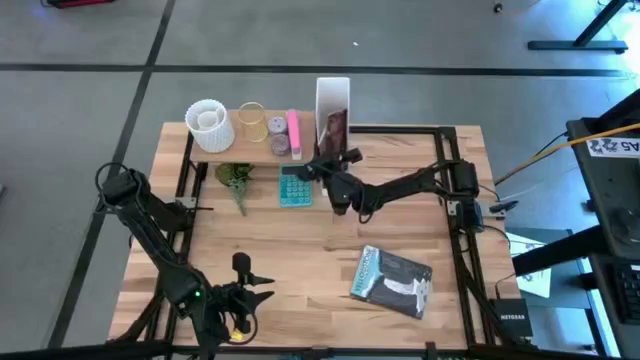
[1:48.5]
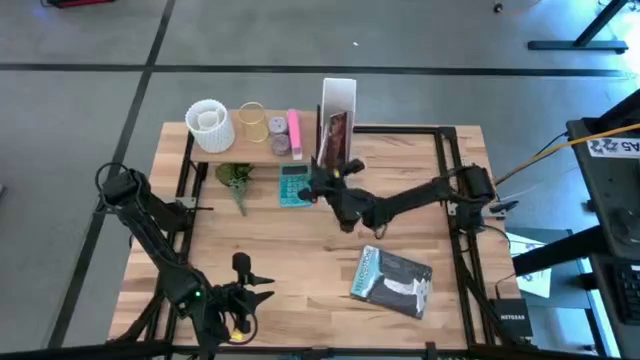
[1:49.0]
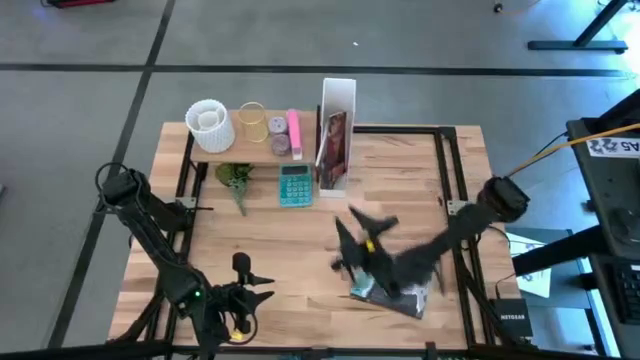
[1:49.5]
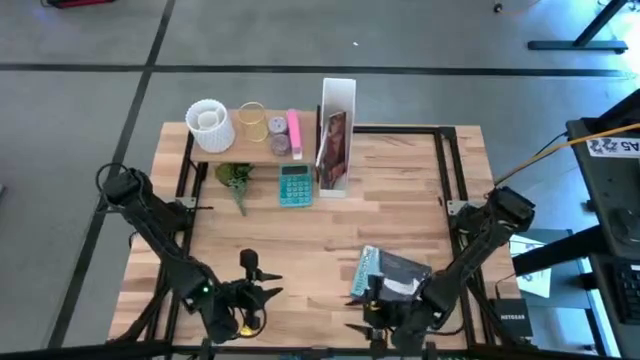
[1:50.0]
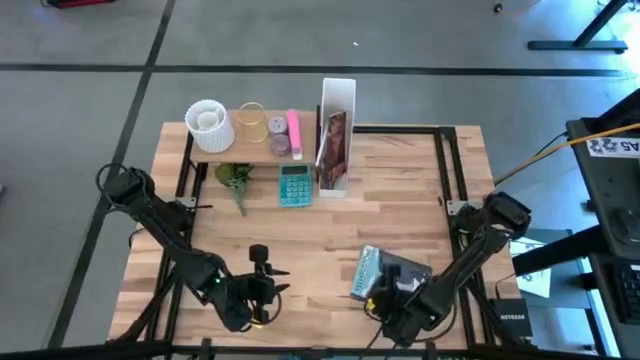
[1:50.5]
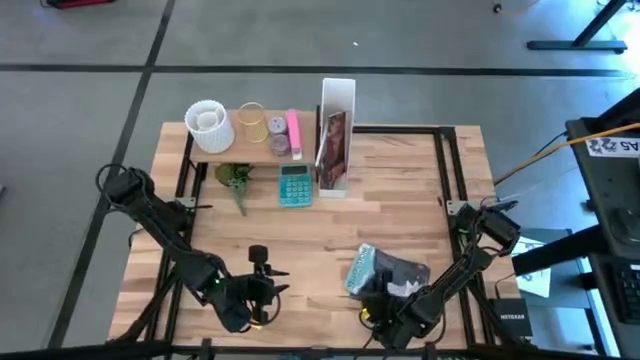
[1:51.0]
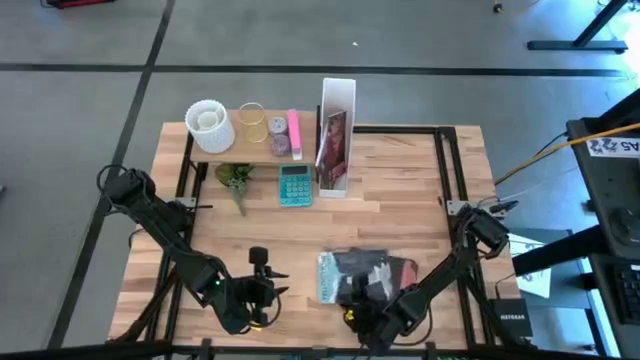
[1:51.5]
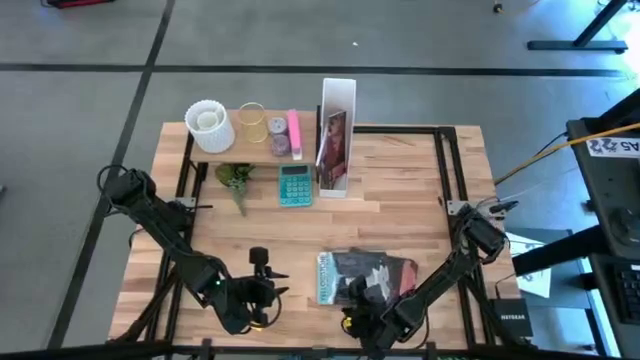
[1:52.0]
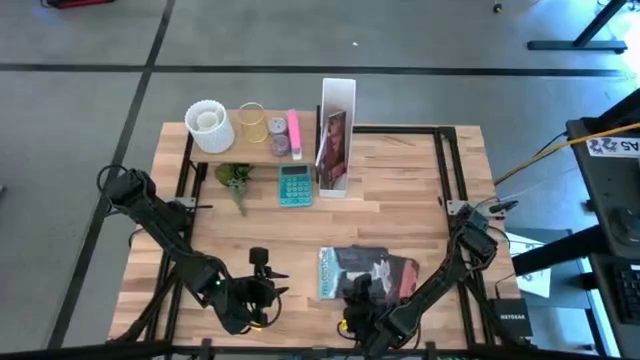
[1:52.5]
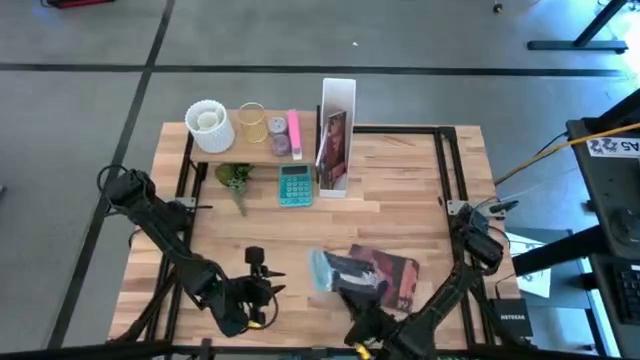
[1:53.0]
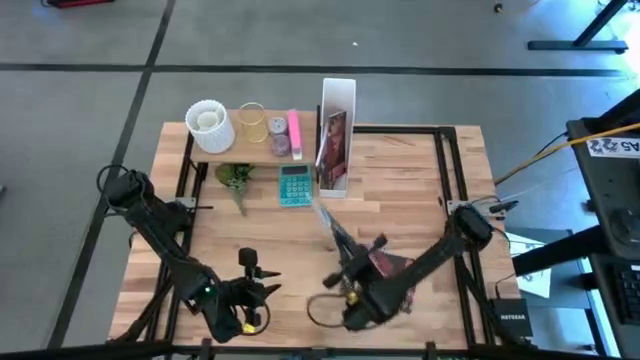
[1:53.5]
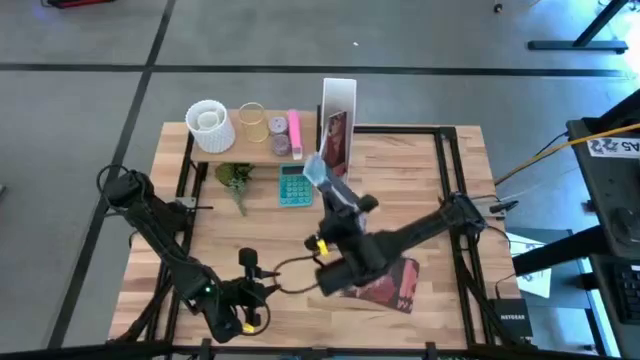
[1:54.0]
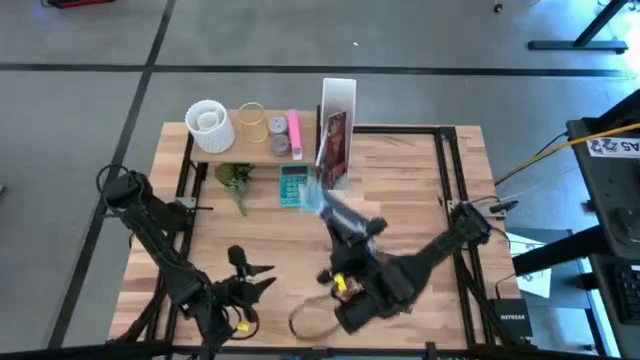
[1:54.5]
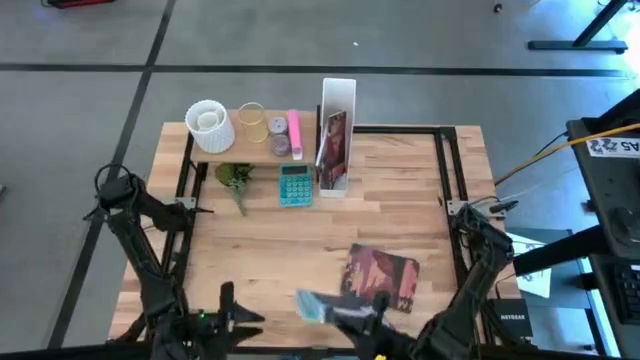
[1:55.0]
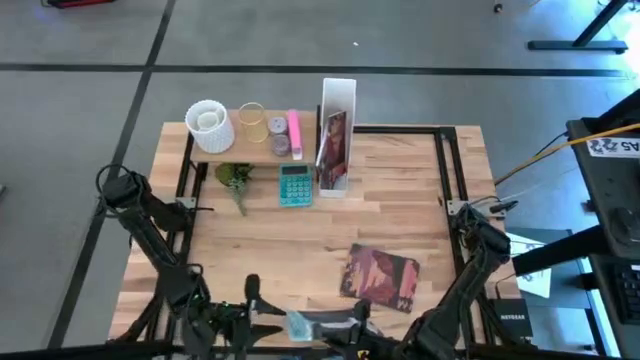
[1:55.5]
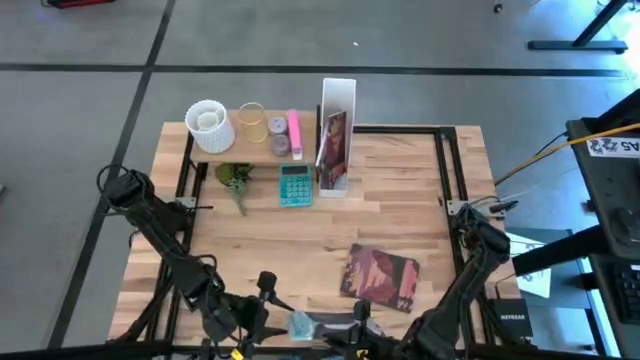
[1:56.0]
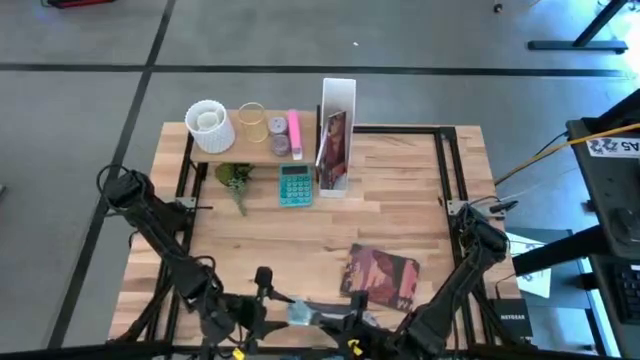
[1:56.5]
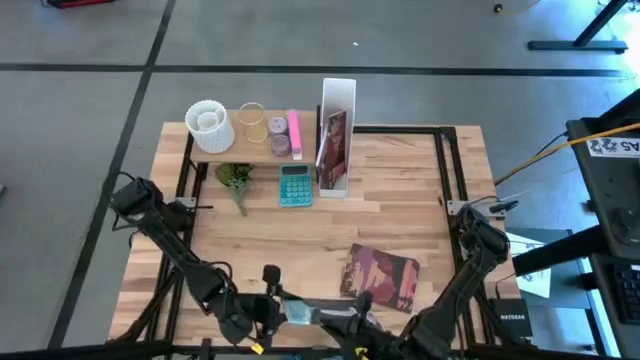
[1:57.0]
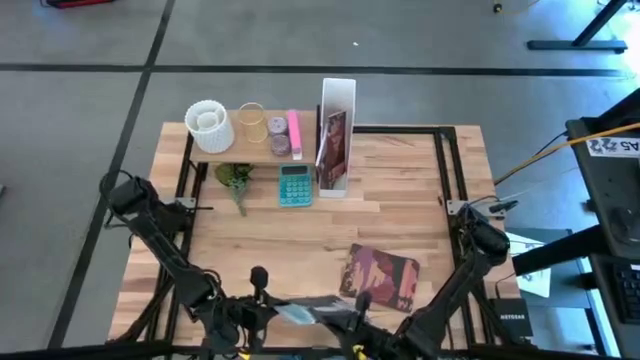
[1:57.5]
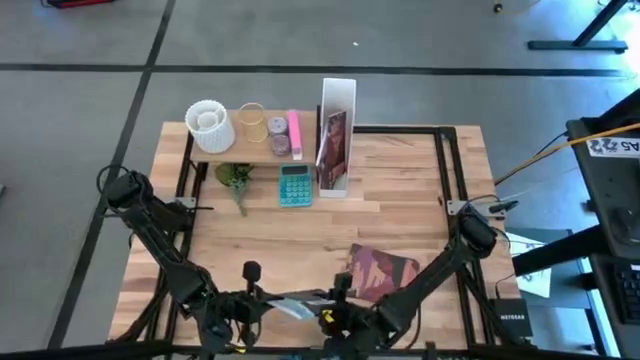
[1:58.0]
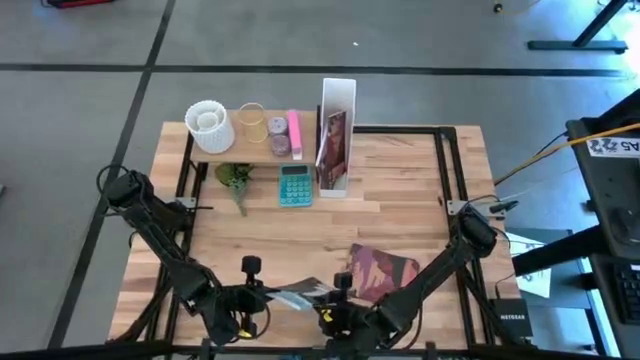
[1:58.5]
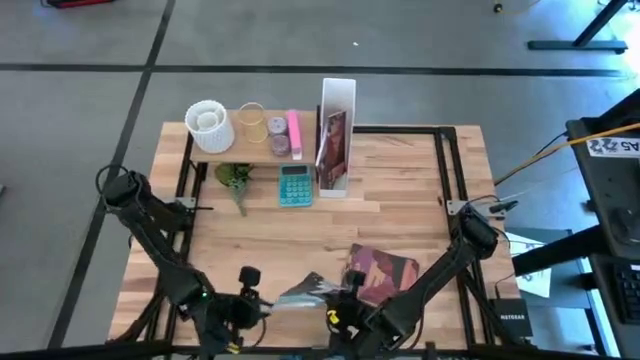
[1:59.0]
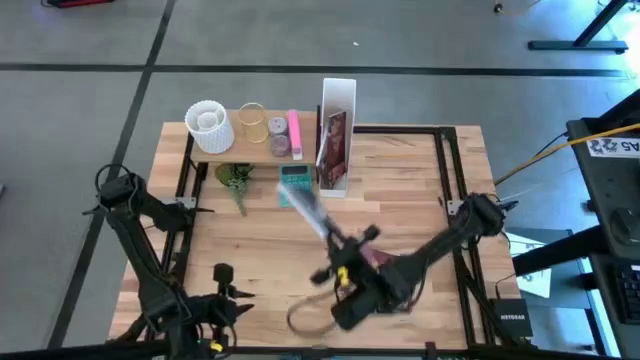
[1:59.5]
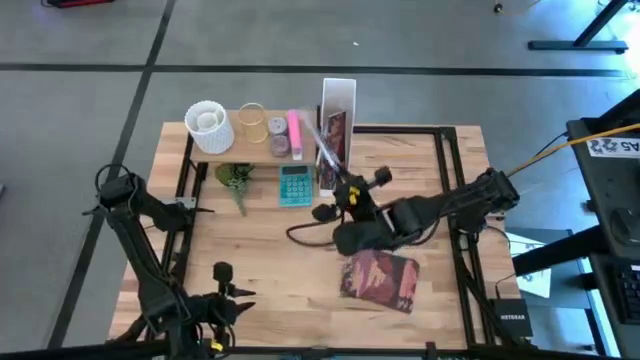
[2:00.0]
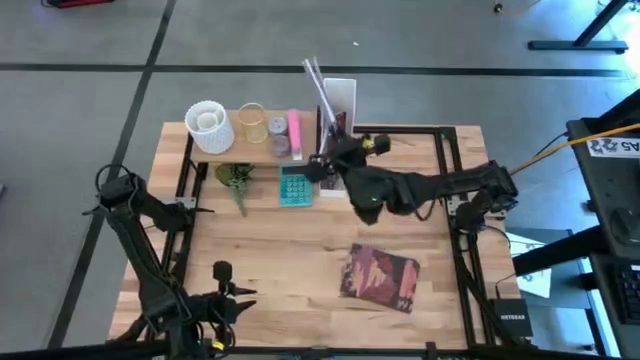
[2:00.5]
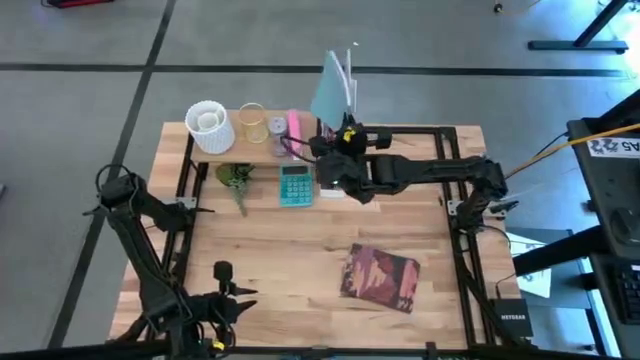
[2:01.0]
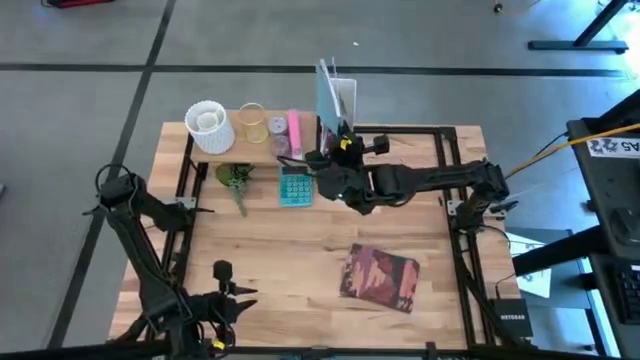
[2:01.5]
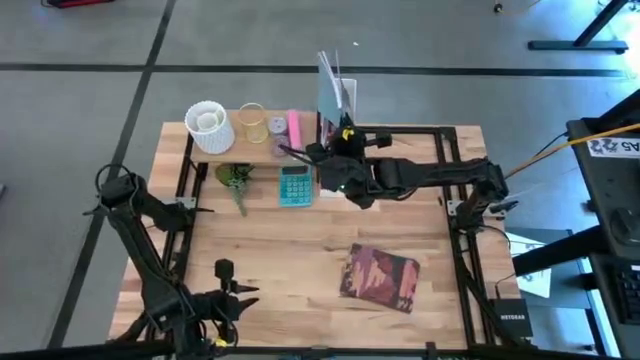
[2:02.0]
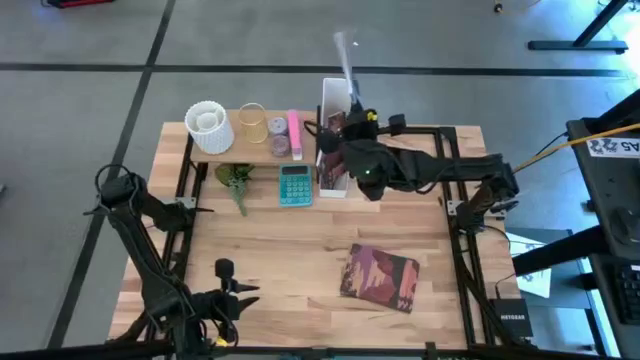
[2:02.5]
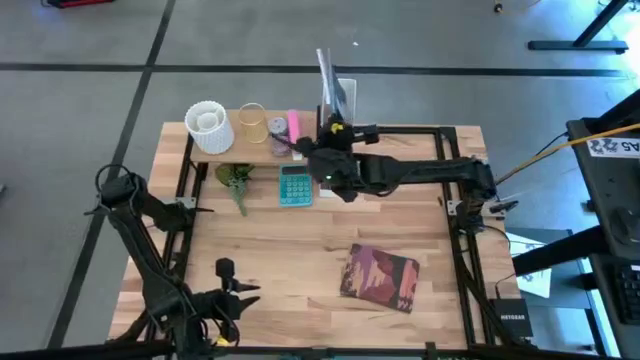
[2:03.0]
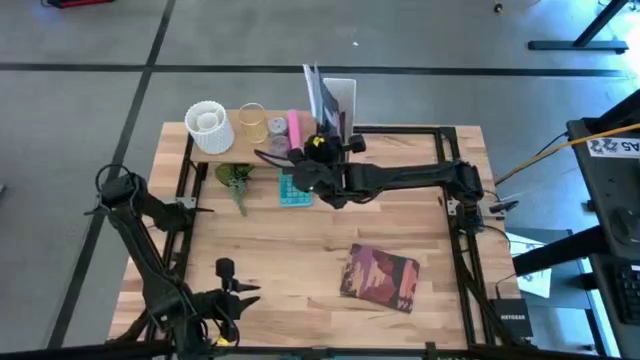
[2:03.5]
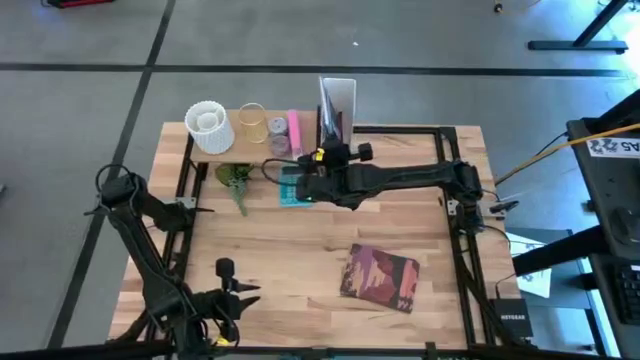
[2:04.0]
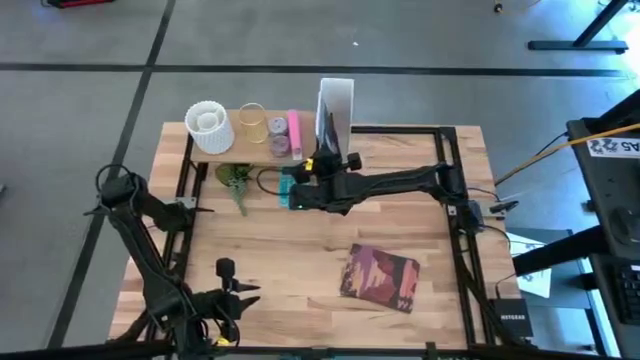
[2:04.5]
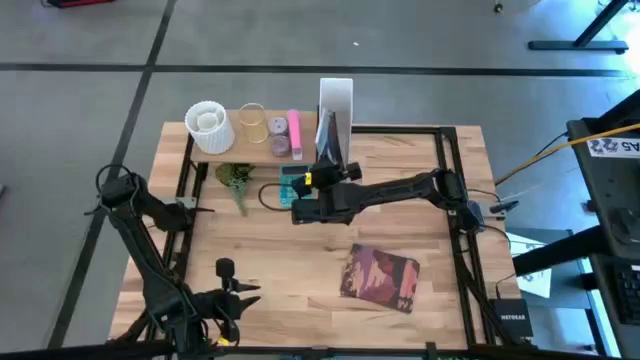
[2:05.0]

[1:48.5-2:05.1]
Task: Stock shelves
Put the light blue book into the white bookshelf

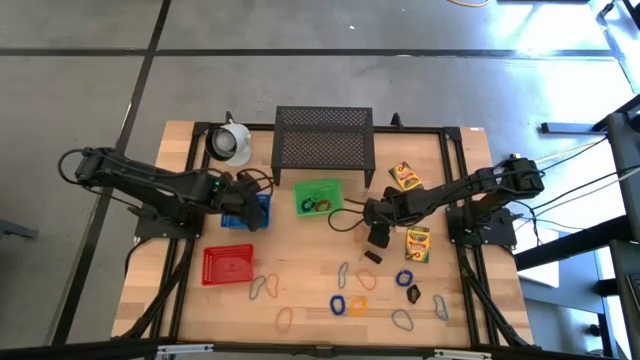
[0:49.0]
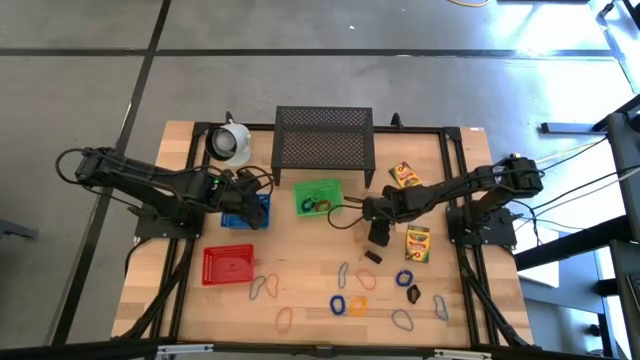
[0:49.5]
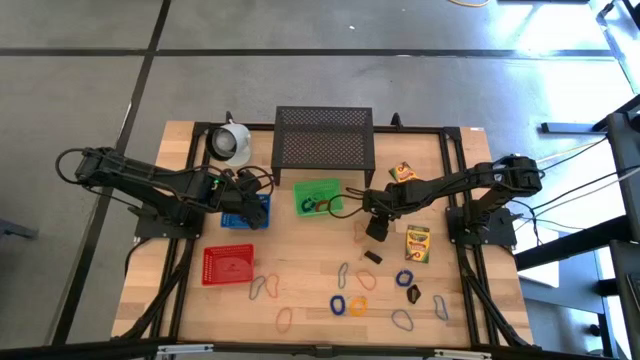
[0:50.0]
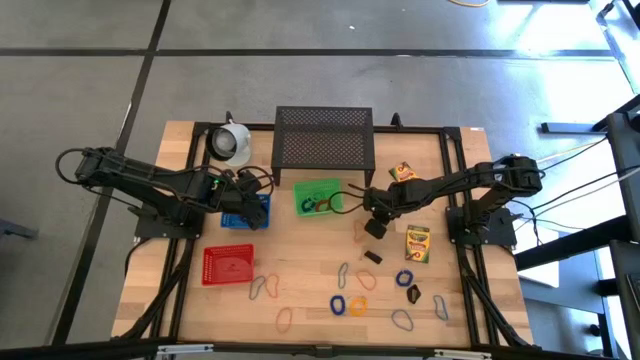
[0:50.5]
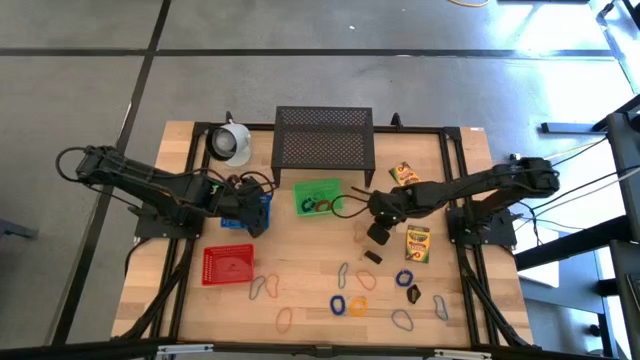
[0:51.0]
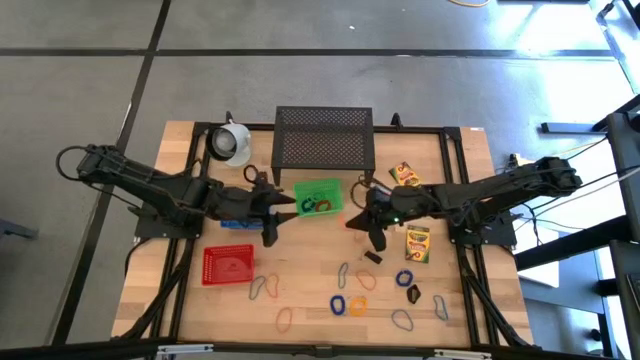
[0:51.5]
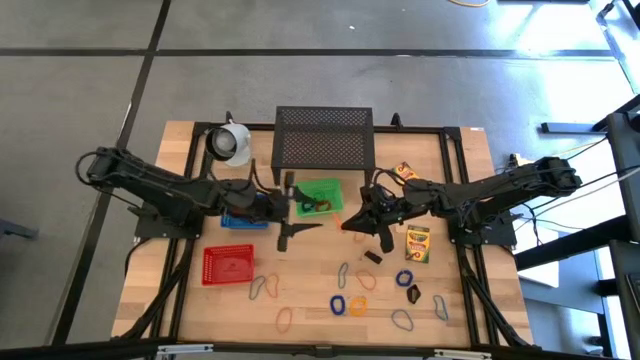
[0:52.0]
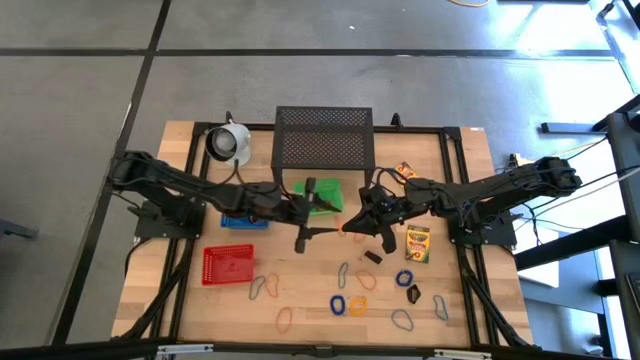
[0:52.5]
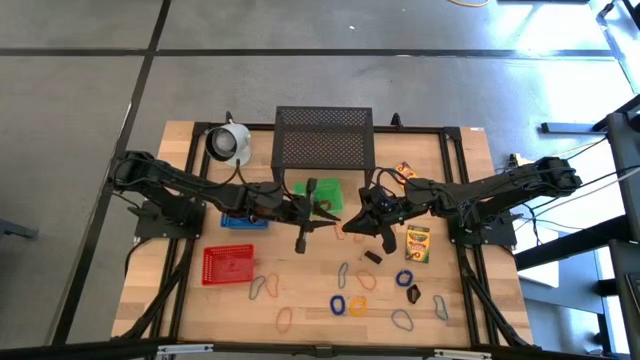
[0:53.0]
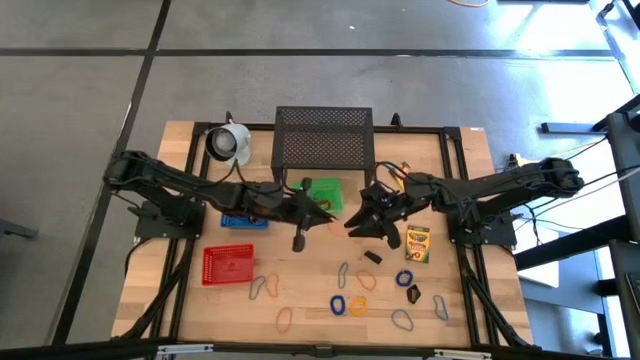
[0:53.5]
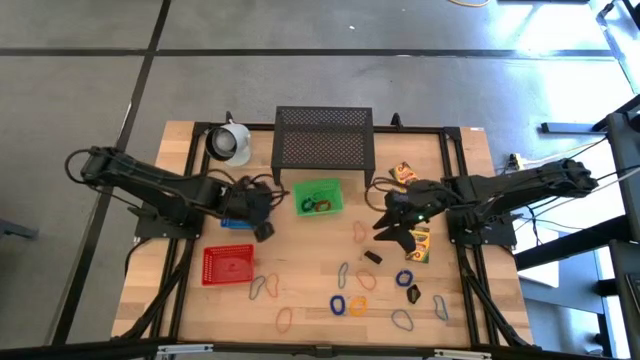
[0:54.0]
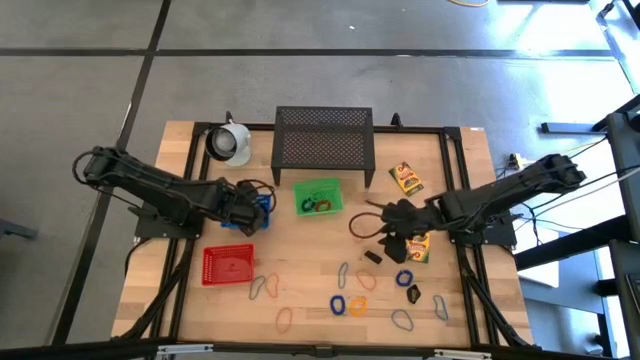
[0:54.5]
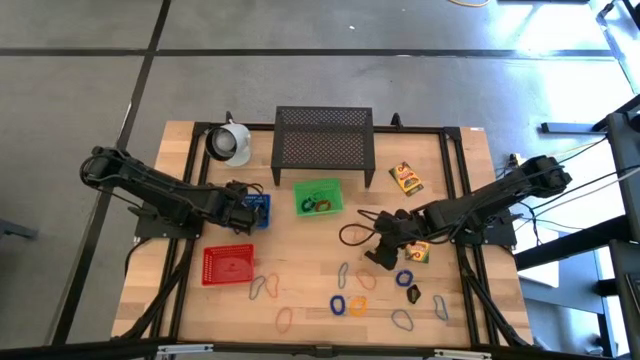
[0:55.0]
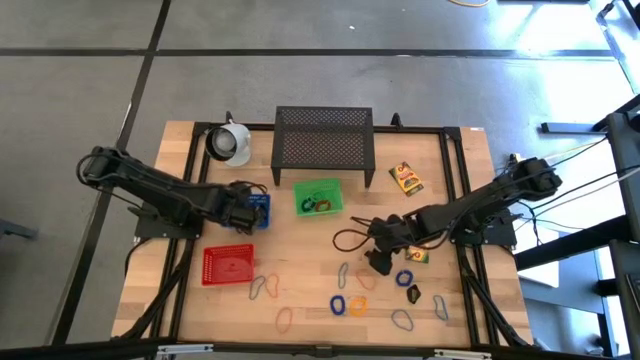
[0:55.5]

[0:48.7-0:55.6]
Task: Pick & Place Office Desk Supplies
Put the orange rubber band into the blue bin
